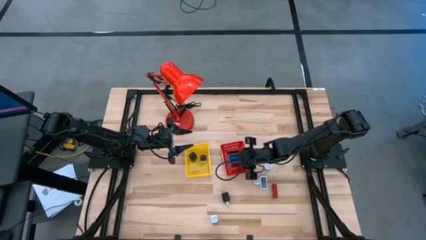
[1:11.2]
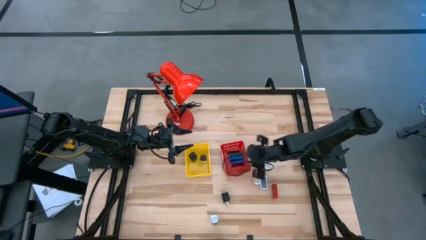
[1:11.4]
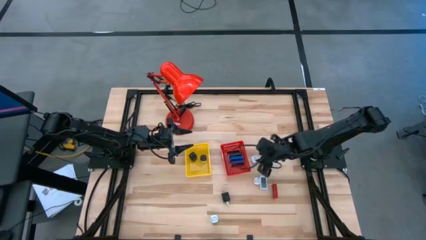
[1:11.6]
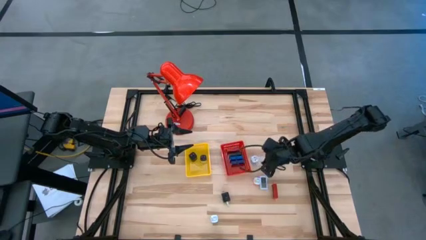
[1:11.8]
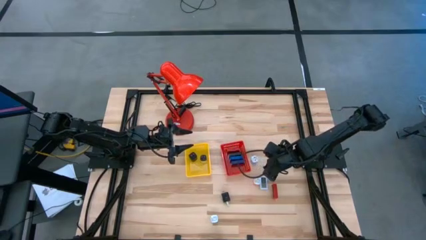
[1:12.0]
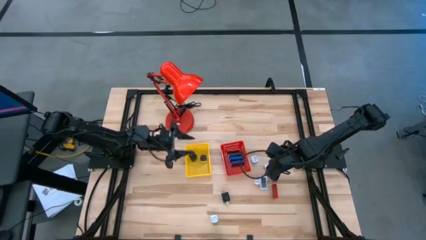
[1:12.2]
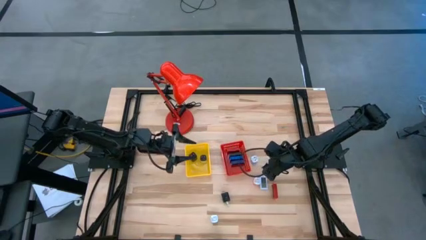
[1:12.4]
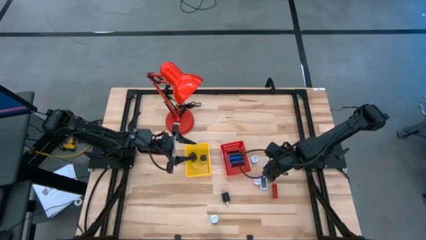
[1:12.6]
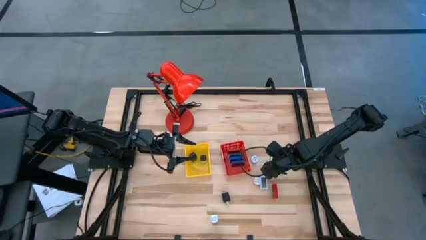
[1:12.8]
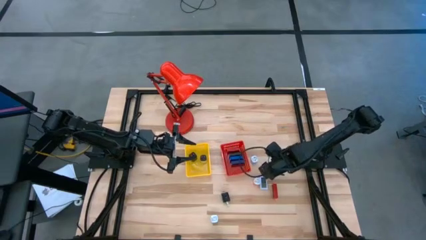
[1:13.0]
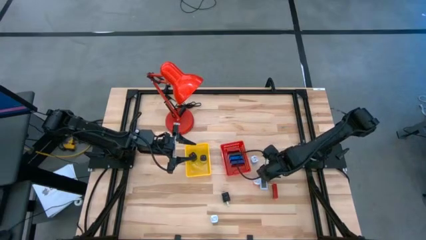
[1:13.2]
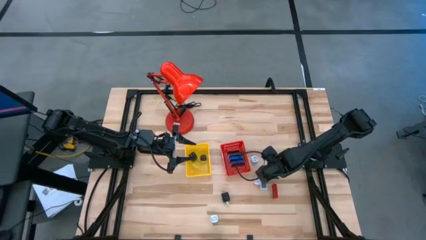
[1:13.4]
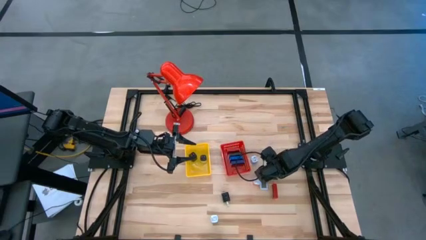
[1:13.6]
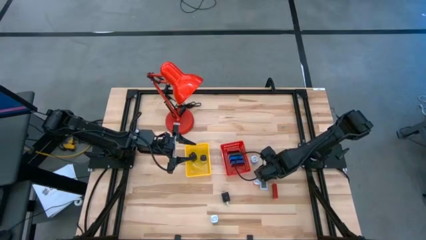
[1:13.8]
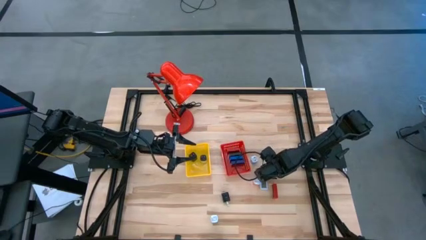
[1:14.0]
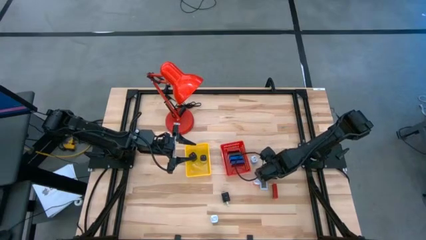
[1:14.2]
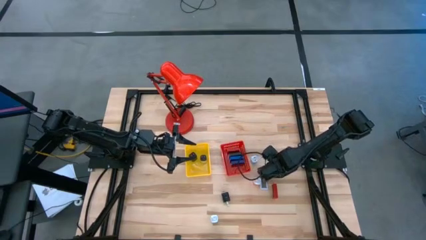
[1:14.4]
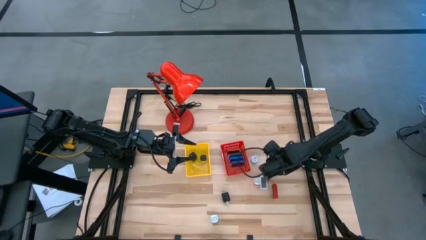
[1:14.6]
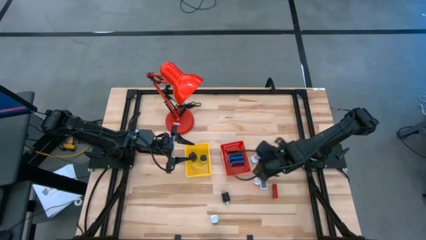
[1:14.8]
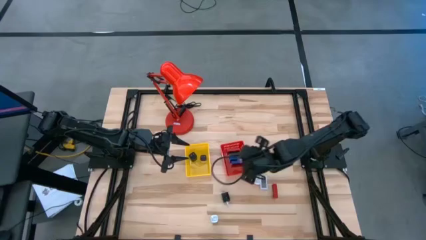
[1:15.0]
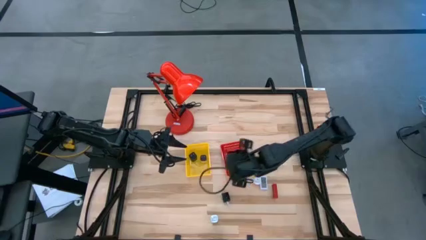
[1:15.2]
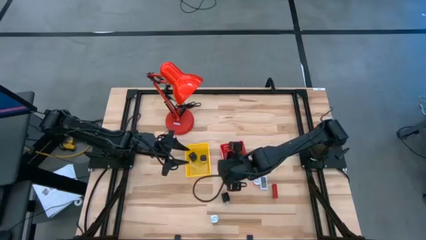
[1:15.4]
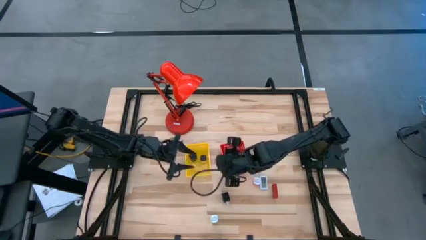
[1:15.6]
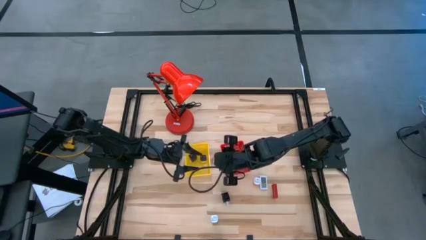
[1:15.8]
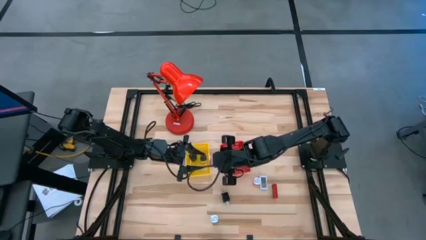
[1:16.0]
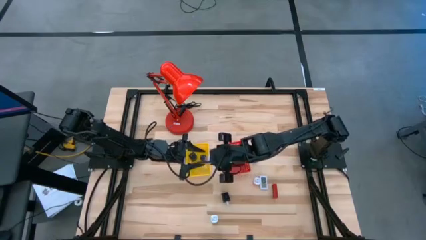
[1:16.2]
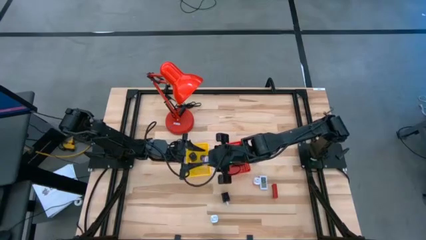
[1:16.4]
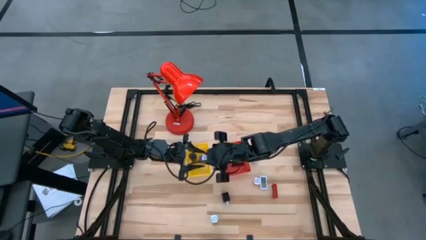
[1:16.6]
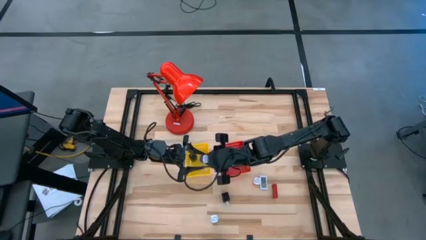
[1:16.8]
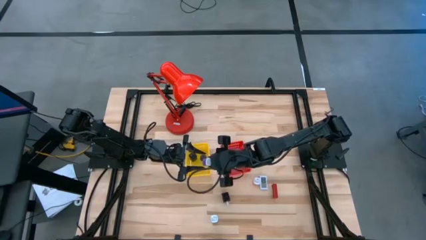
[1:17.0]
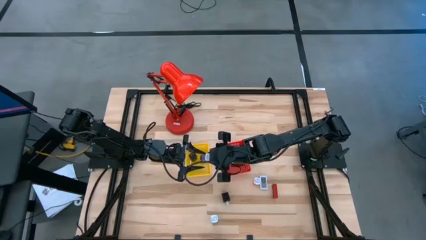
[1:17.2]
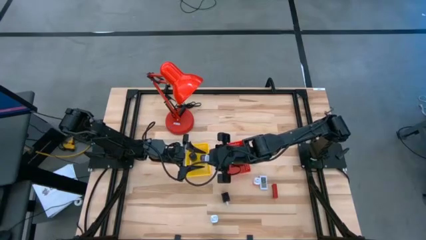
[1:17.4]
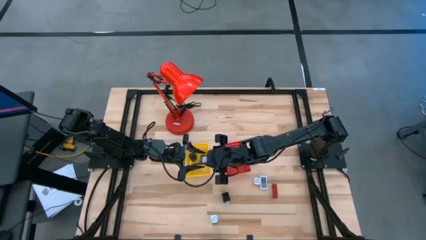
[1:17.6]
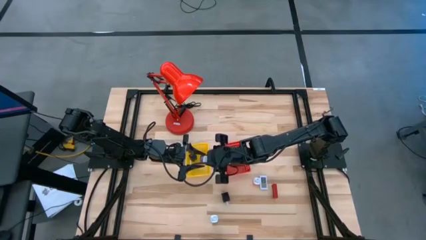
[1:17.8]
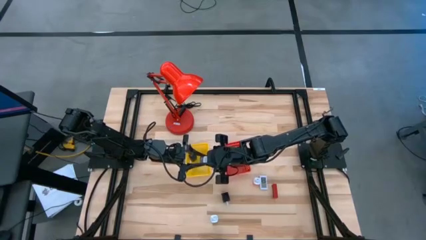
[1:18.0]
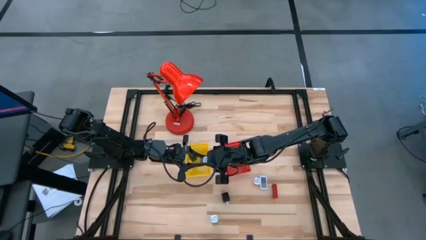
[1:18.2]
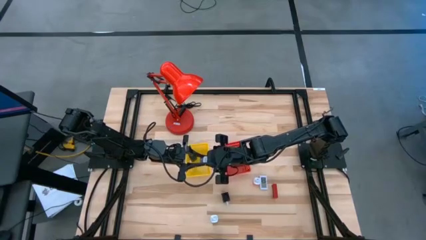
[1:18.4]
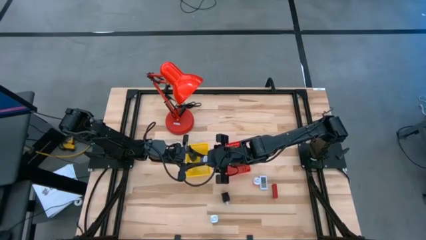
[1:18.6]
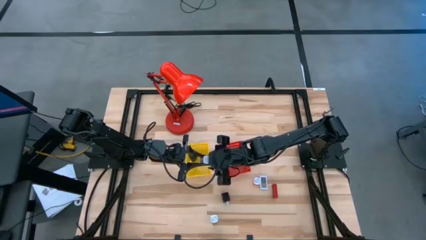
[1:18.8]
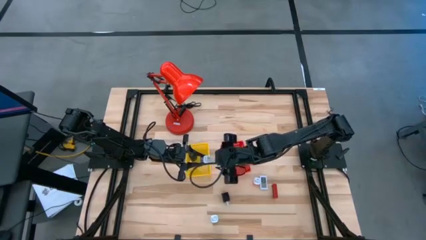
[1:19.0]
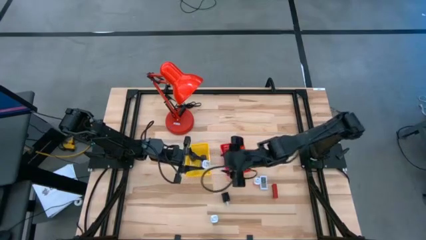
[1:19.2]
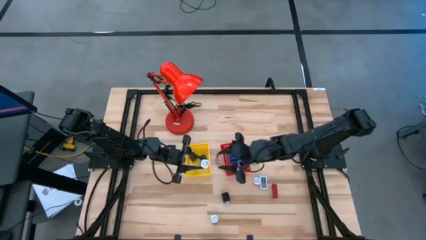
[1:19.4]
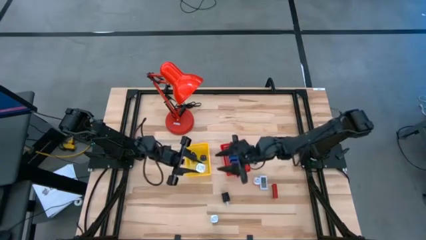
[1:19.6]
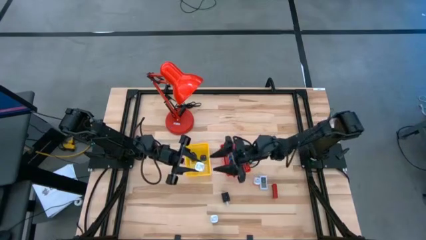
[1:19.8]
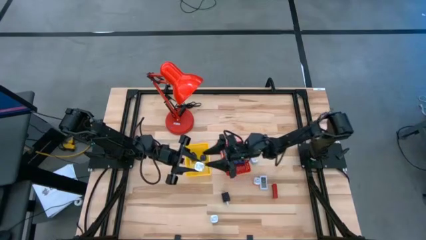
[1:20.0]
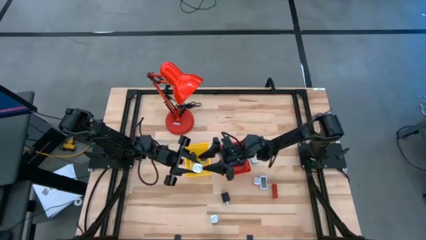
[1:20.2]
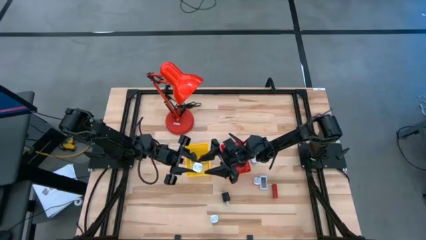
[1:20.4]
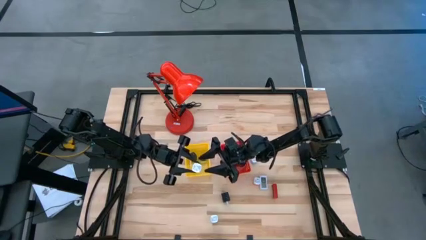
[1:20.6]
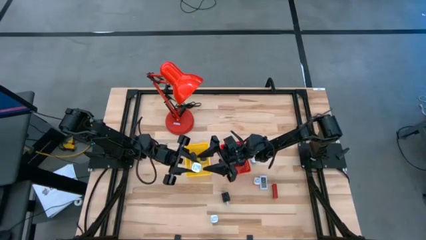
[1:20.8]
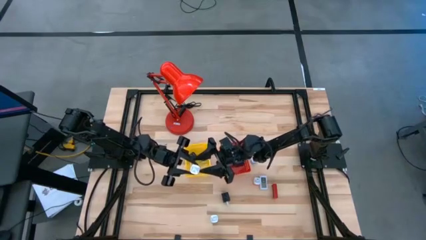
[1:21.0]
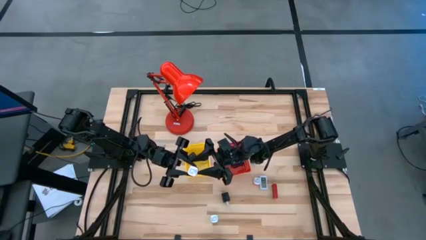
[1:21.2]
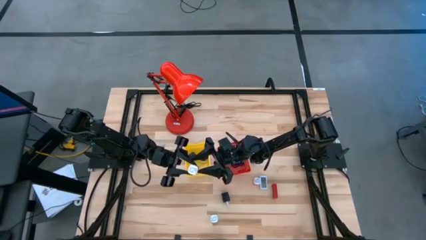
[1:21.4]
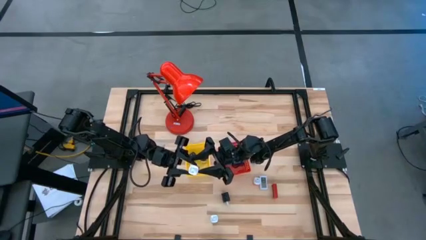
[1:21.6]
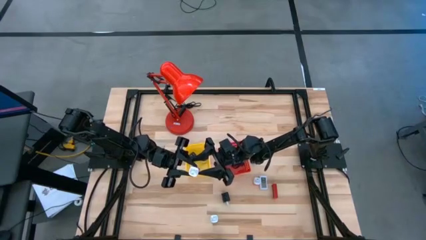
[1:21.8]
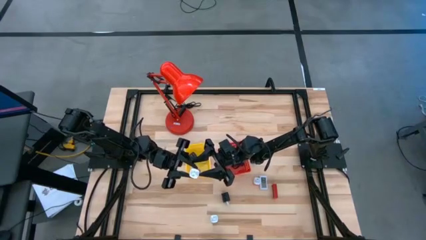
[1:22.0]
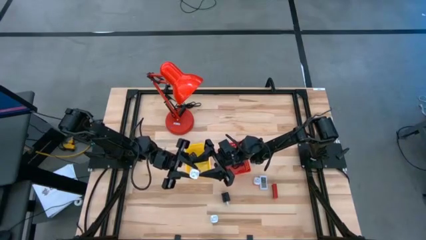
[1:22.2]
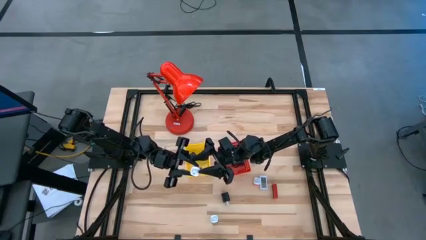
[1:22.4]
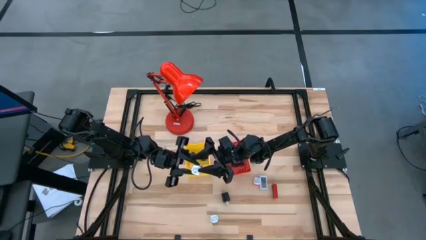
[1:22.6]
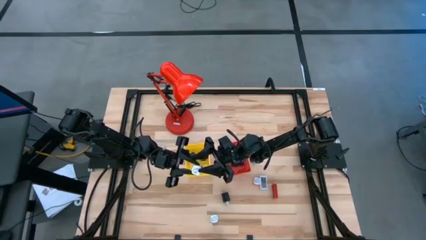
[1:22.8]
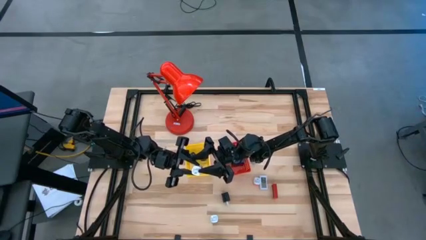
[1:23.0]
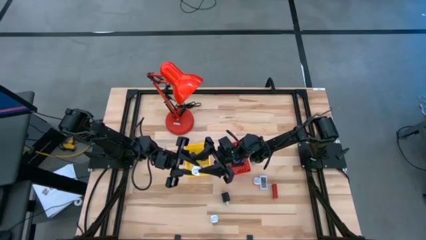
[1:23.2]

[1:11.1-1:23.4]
Task: Pick & Place Office items
Put the purple charger adapter into the yellow bin
